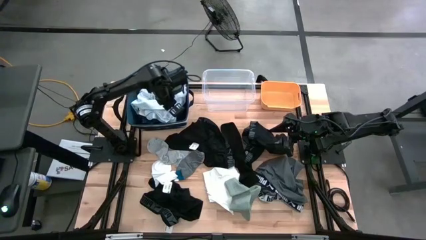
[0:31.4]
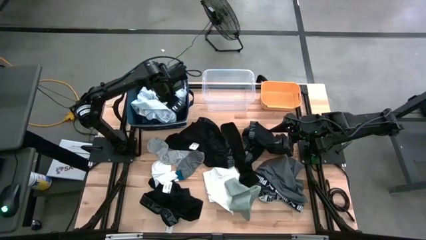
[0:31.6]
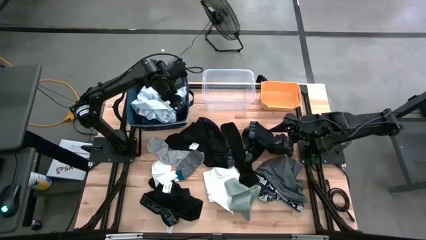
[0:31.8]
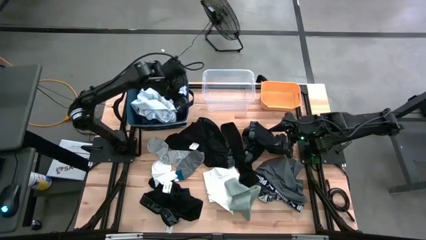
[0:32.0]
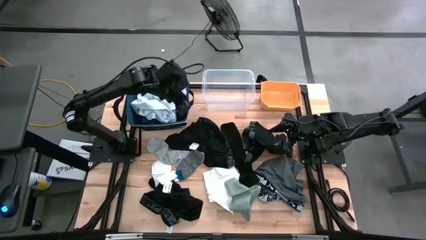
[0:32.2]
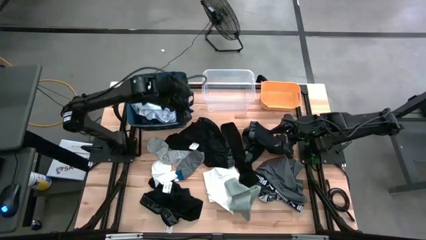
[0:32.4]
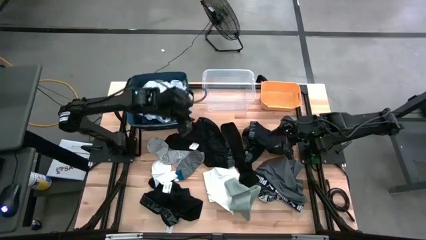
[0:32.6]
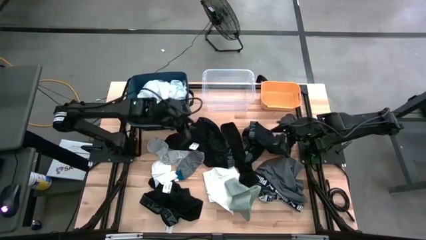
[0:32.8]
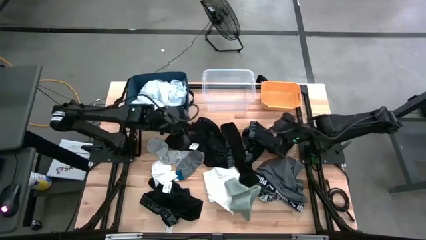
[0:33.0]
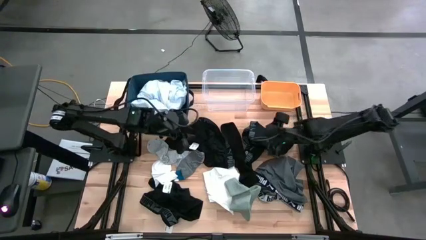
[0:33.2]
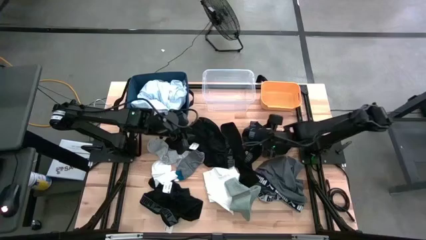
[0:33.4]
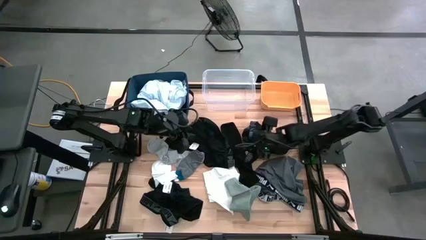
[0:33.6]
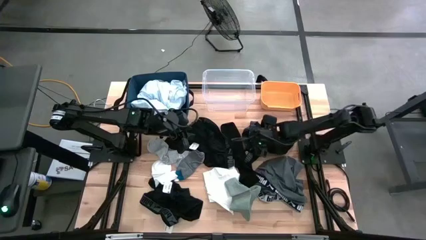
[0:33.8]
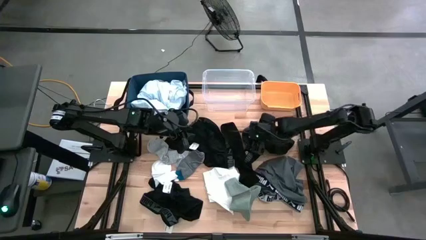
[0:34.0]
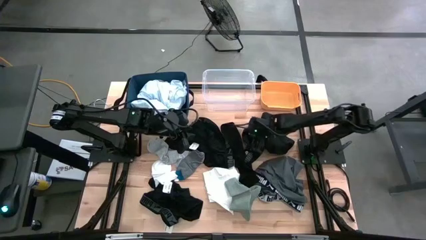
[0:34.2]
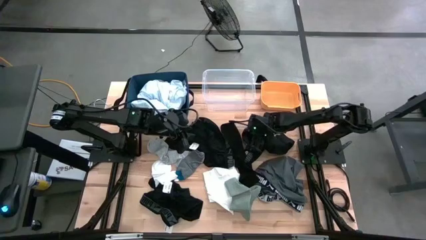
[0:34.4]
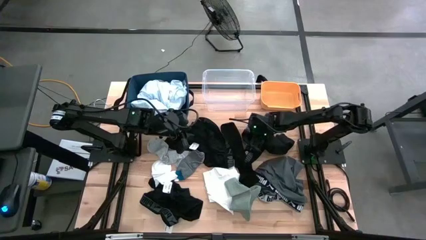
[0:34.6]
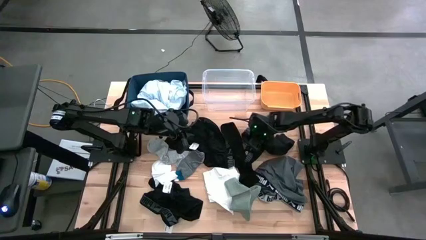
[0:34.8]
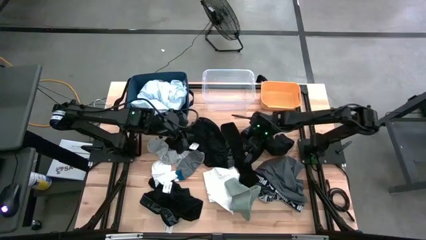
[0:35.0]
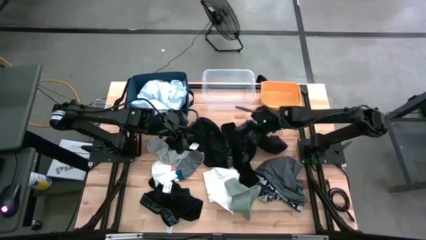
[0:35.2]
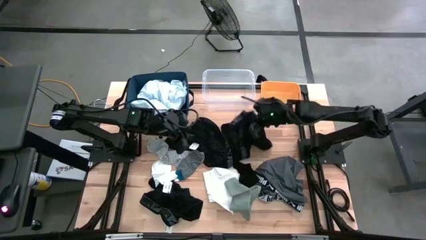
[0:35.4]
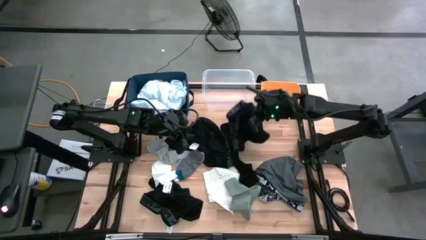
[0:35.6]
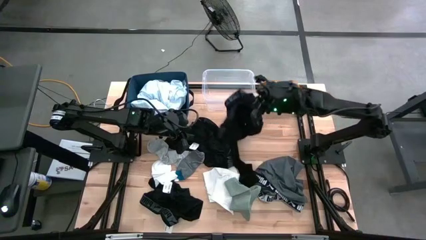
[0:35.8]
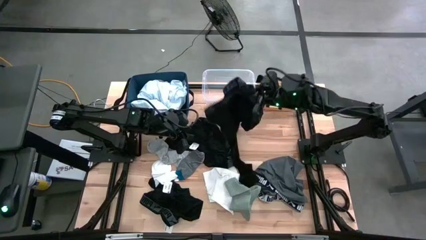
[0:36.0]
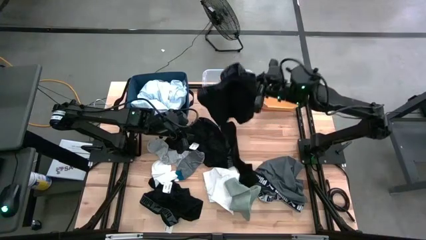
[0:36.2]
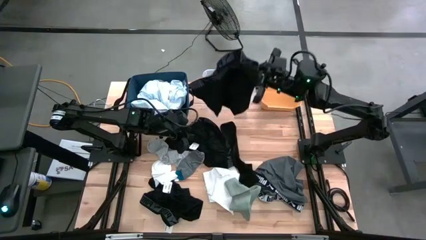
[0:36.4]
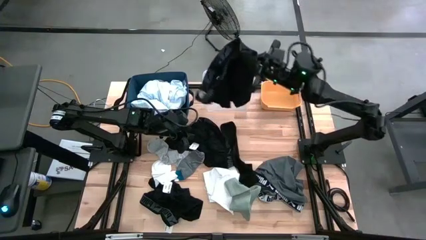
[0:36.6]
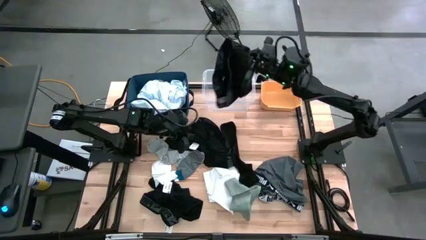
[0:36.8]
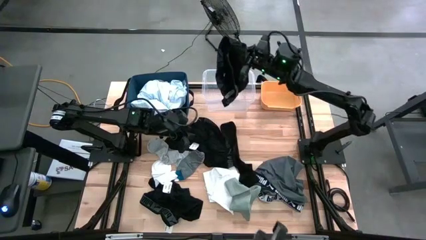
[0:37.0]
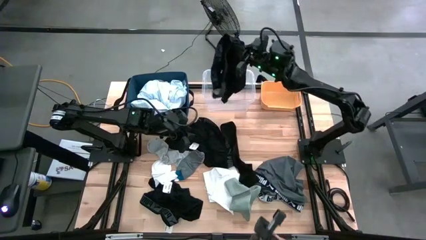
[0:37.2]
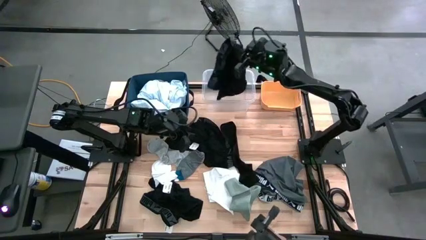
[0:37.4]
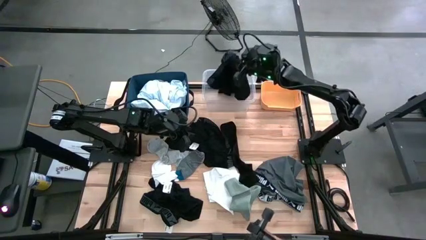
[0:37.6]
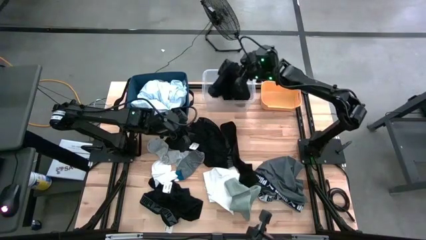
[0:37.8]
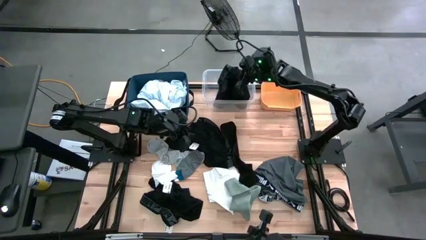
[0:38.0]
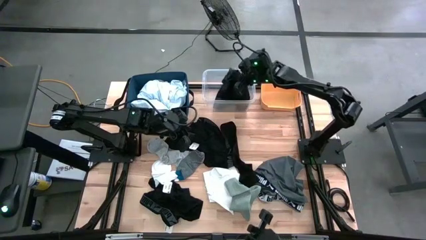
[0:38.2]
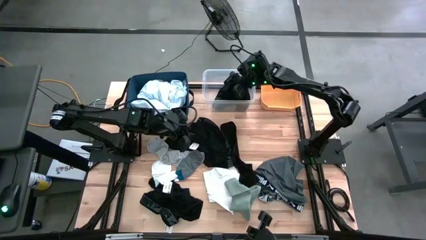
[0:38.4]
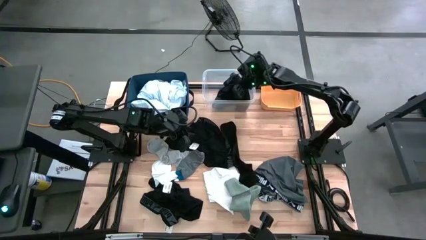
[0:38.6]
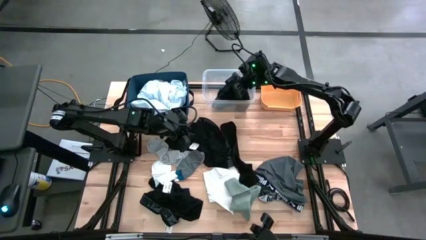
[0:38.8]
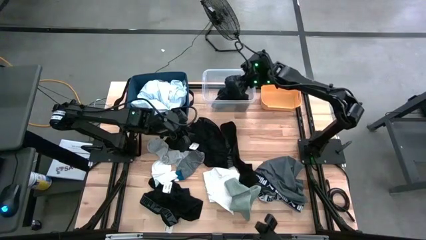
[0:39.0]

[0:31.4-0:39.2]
Task: Pick & Place Cloths
Put the top right black boxer short into the transparent bin

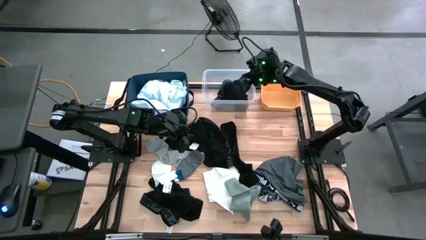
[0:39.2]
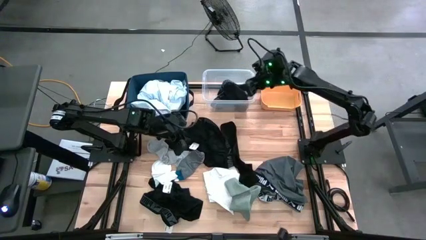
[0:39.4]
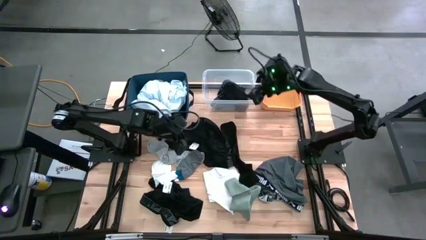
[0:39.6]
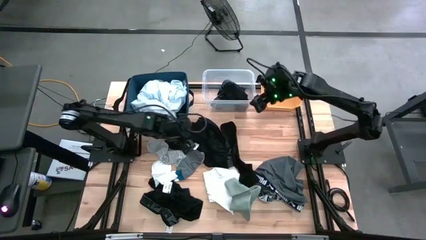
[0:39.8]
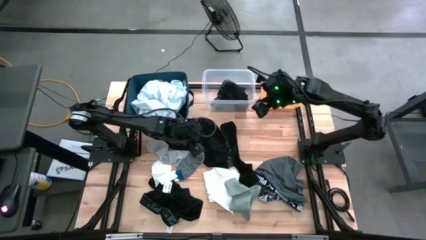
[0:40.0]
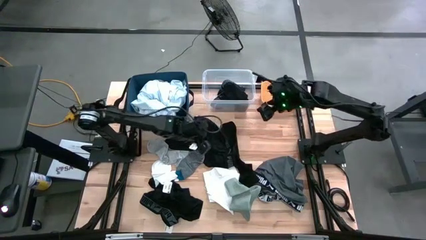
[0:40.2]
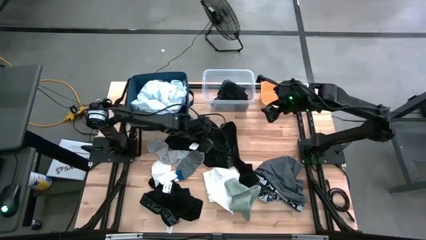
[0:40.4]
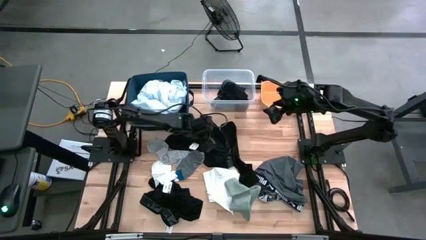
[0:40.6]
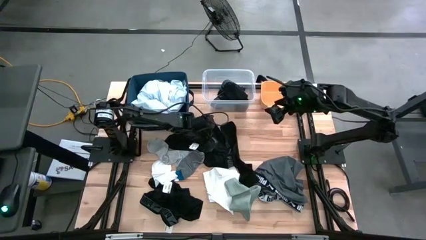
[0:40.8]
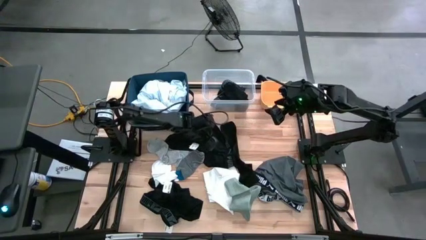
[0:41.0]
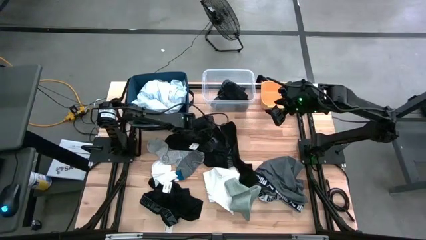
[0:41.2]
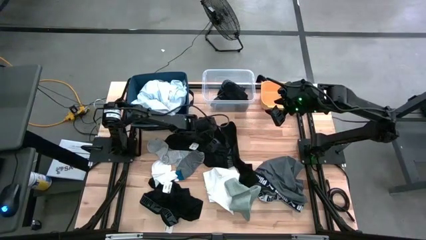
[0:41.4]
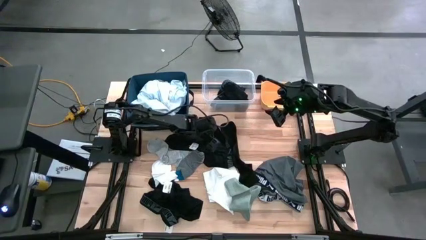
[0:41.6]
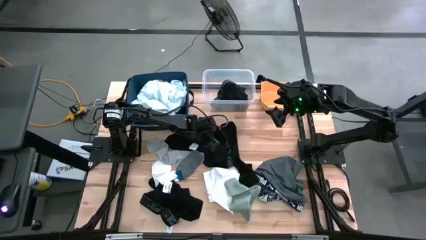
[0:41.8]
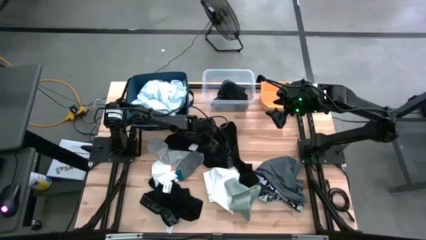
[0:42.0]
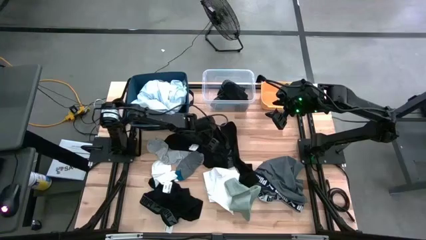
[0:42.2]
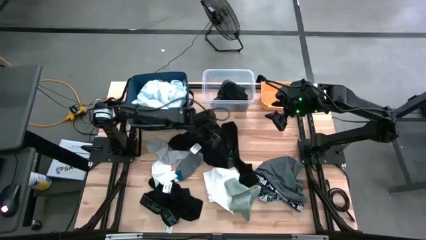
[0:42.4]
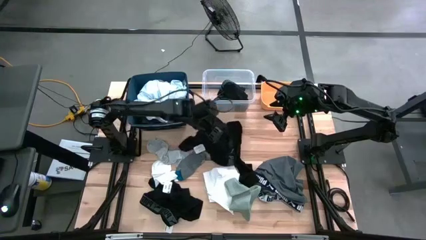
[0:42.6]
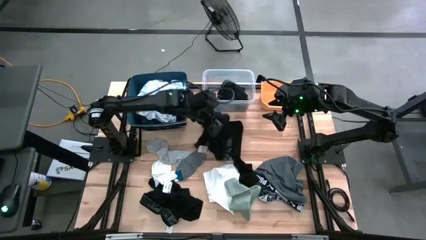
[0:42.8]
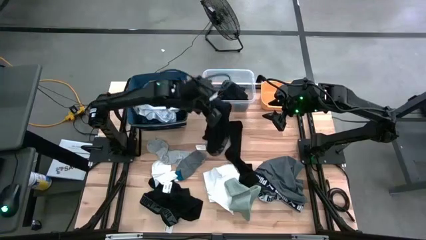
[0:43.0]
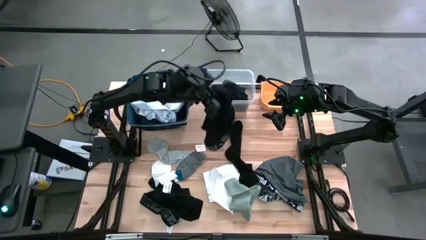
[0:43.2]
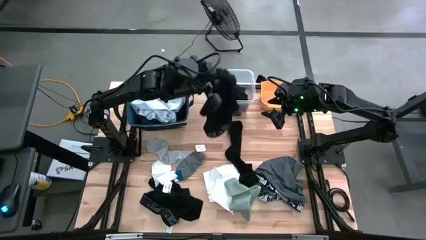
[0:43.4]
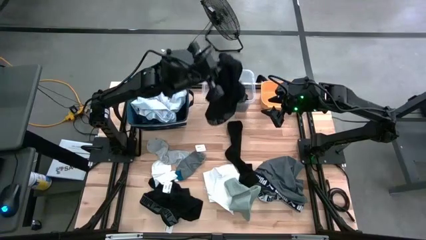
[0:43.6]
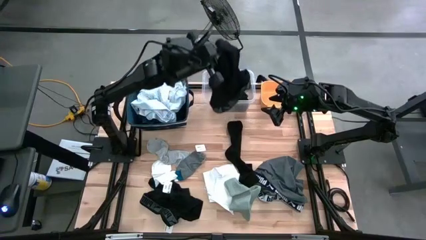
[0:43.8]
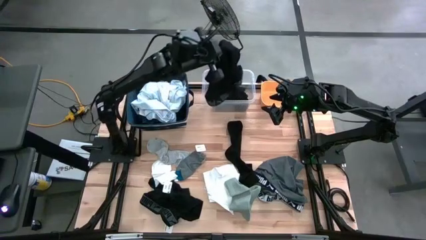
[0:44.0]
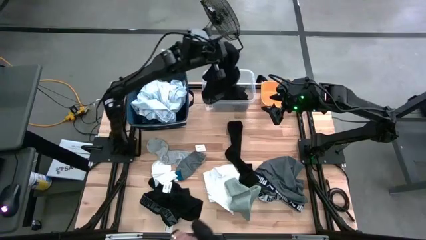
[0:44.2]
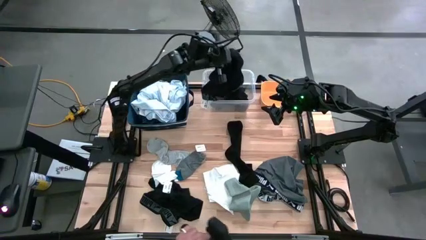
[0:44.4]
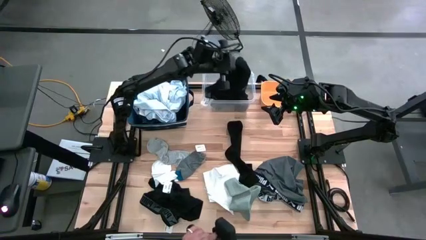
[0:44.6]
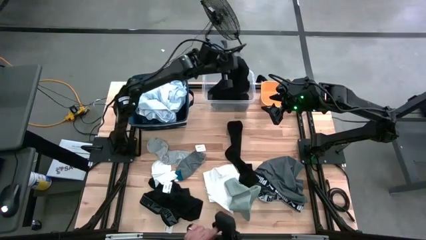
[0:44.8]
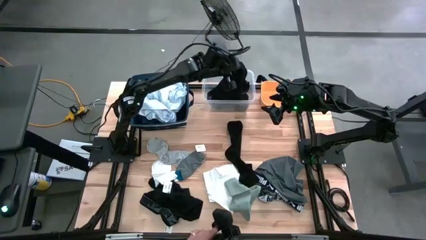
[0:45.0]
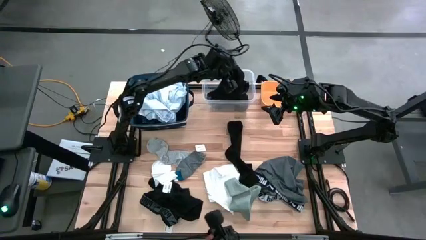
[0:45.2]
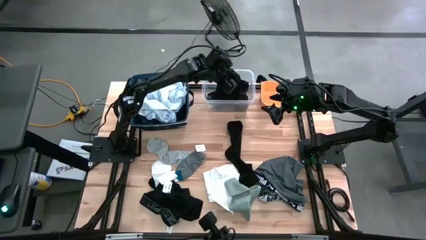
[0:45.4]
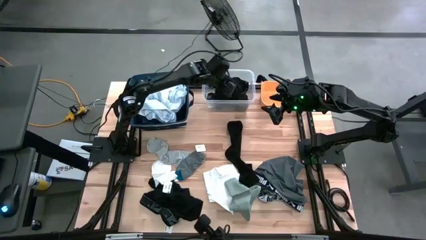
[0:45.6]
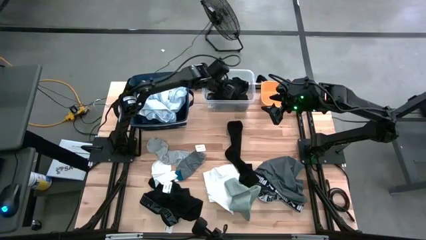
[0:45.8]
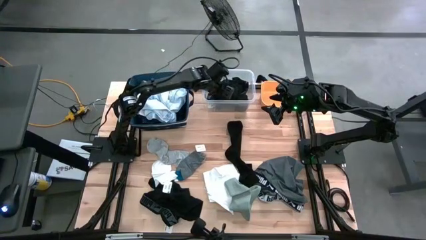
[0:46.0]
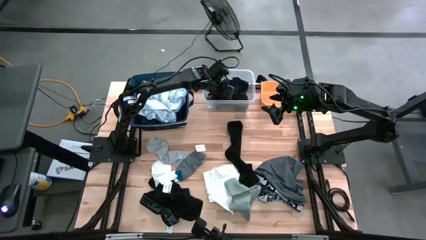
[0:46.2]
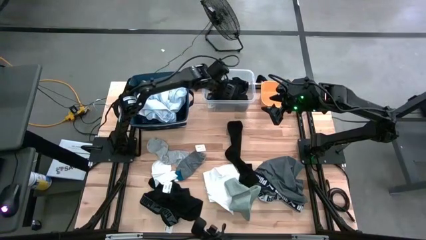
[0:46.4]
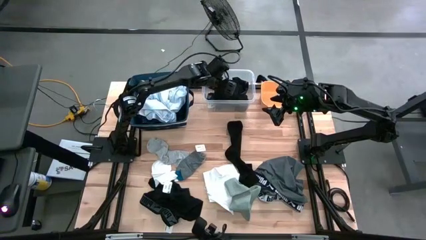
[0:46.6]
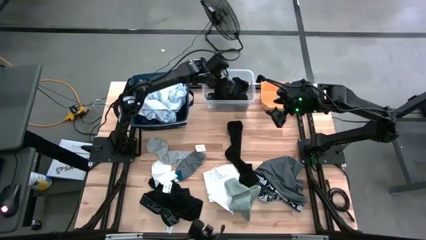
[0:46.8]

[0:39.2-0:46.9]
Put the top black boxer short into the transparent bin
